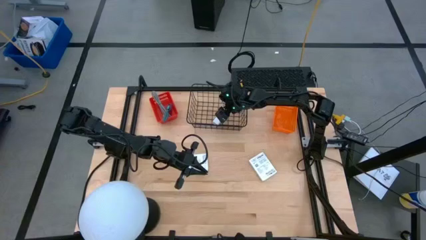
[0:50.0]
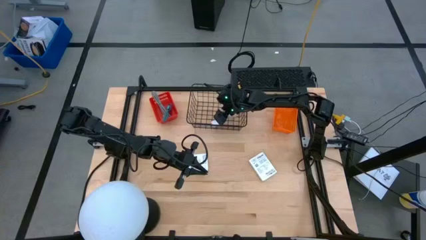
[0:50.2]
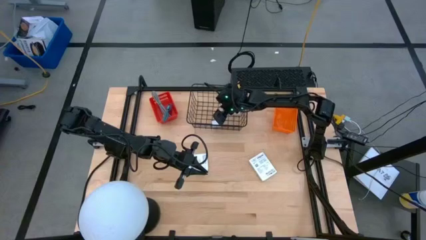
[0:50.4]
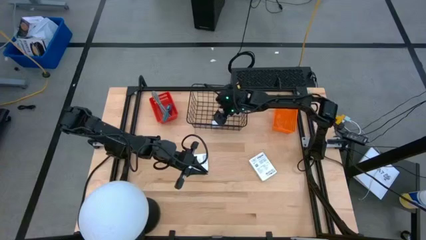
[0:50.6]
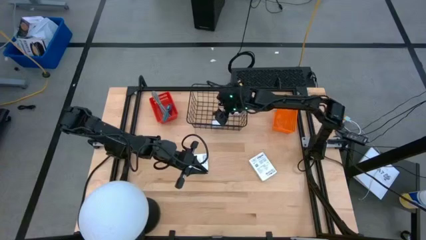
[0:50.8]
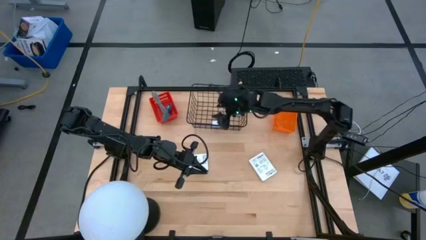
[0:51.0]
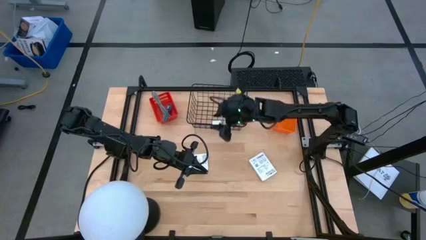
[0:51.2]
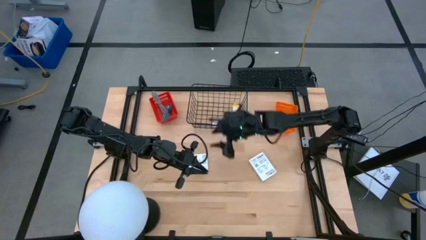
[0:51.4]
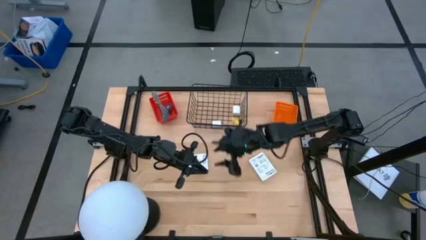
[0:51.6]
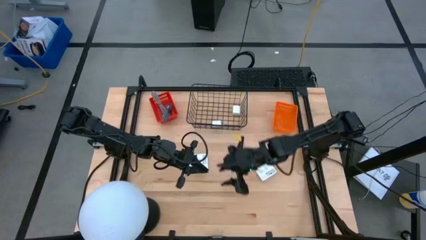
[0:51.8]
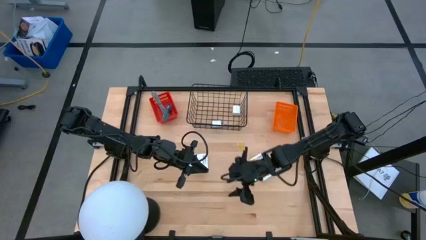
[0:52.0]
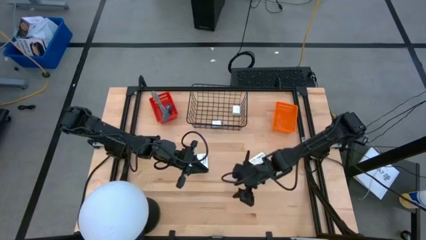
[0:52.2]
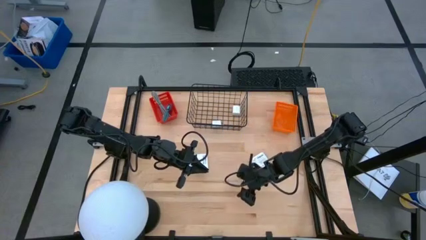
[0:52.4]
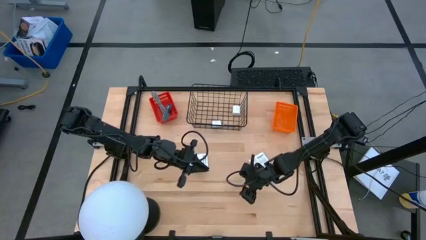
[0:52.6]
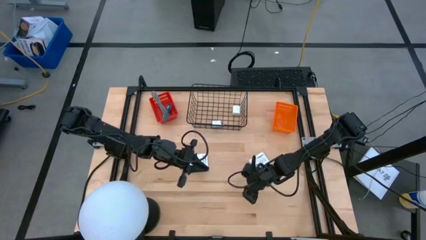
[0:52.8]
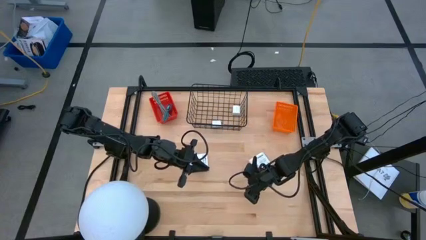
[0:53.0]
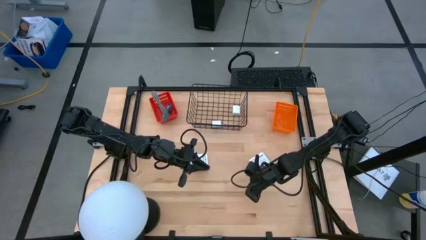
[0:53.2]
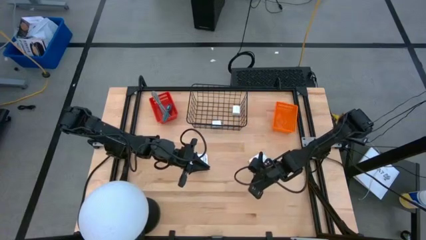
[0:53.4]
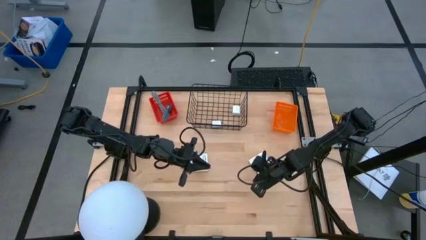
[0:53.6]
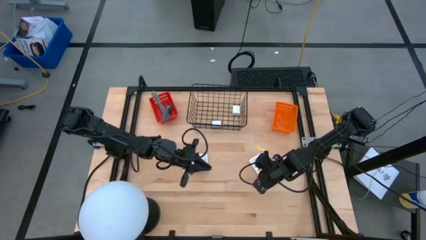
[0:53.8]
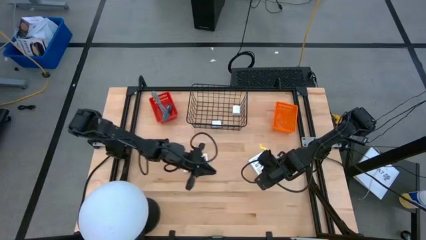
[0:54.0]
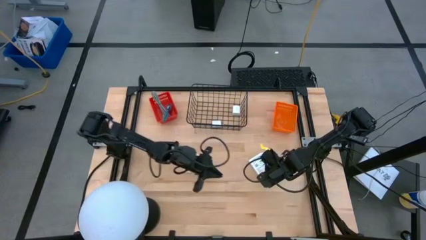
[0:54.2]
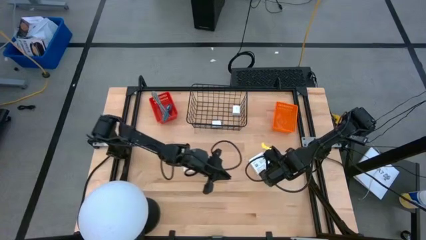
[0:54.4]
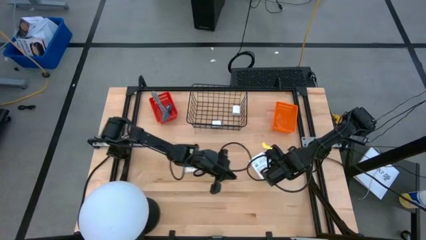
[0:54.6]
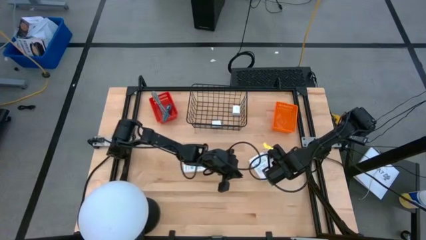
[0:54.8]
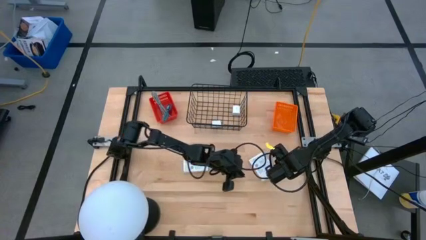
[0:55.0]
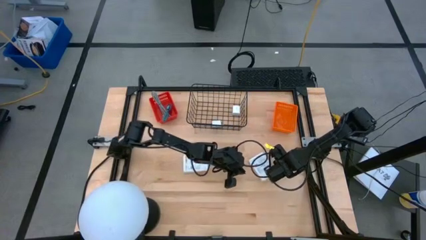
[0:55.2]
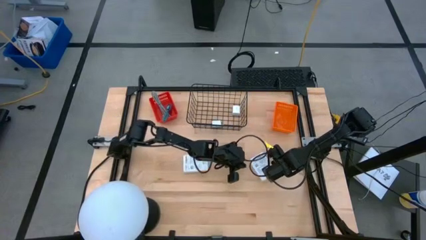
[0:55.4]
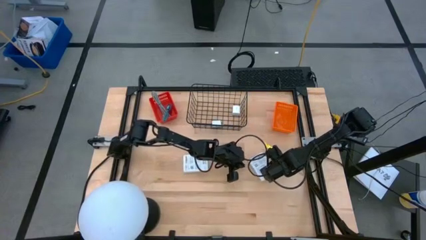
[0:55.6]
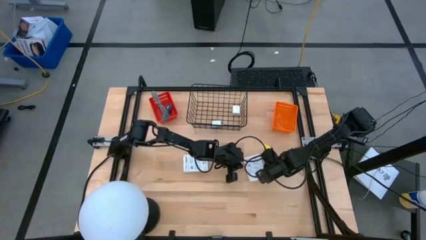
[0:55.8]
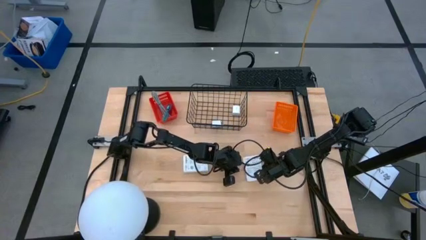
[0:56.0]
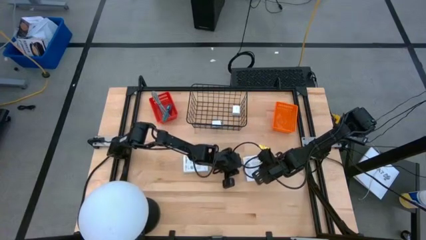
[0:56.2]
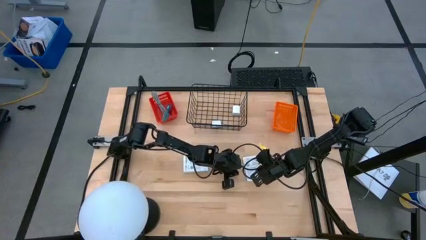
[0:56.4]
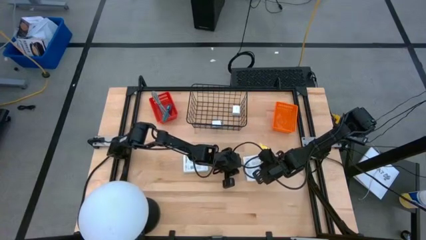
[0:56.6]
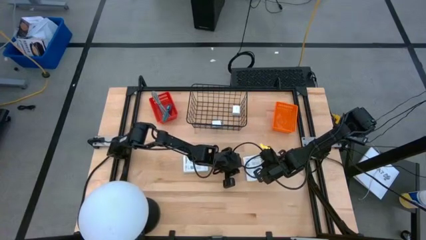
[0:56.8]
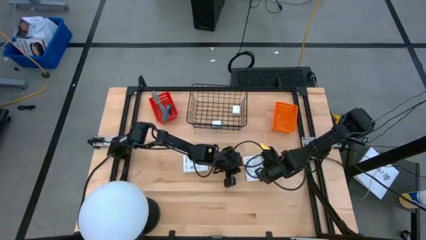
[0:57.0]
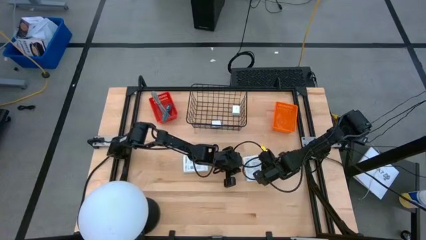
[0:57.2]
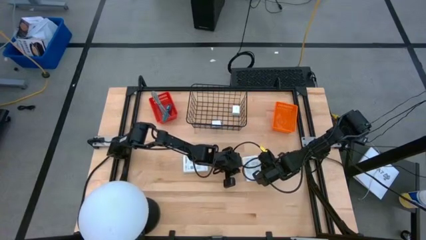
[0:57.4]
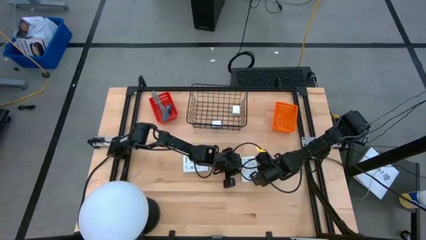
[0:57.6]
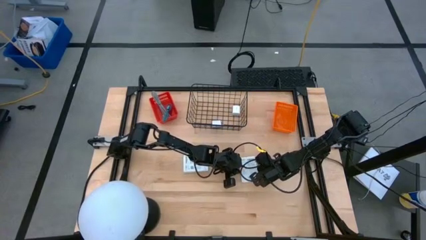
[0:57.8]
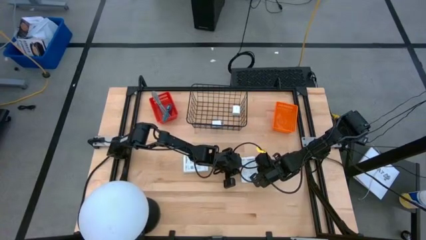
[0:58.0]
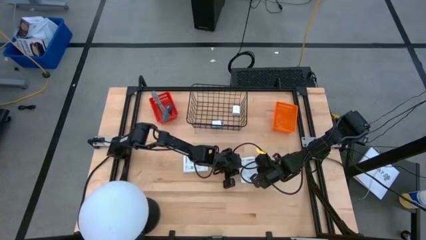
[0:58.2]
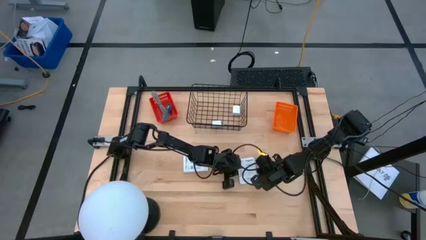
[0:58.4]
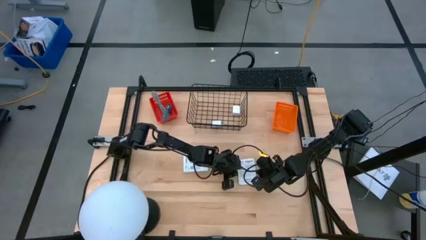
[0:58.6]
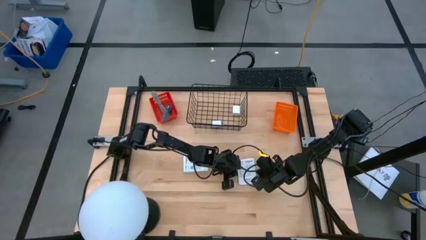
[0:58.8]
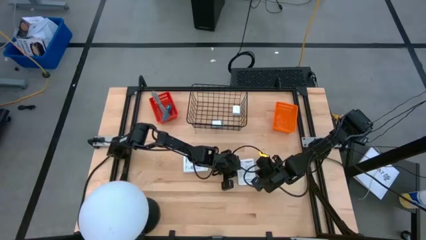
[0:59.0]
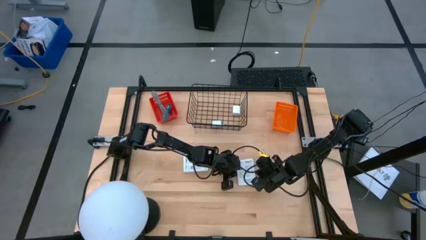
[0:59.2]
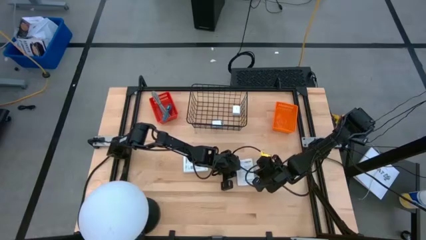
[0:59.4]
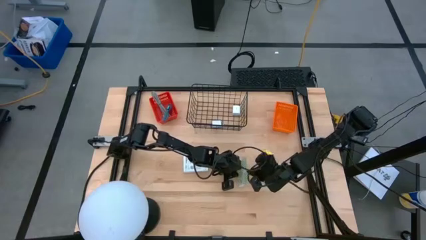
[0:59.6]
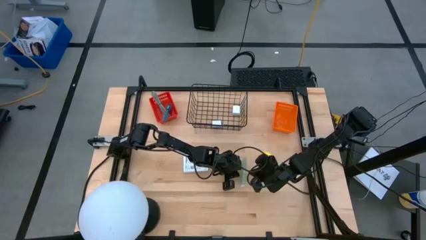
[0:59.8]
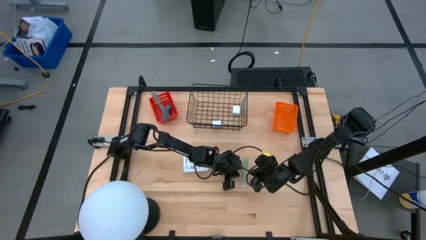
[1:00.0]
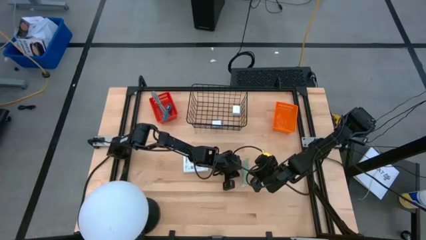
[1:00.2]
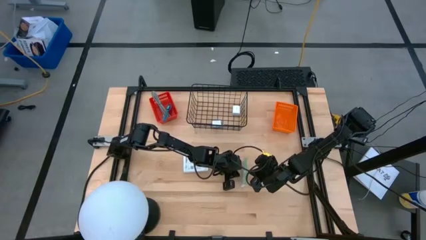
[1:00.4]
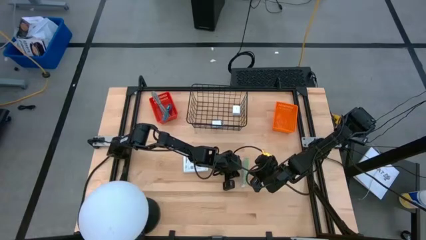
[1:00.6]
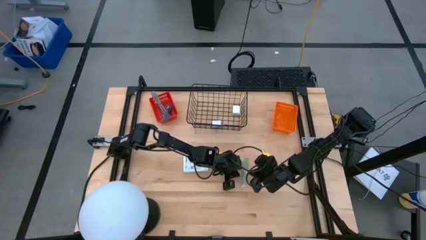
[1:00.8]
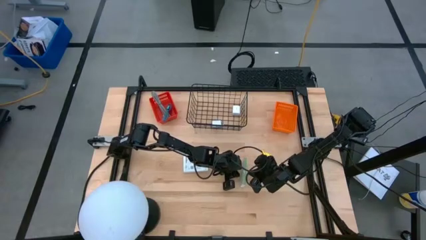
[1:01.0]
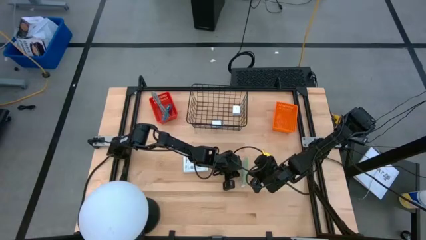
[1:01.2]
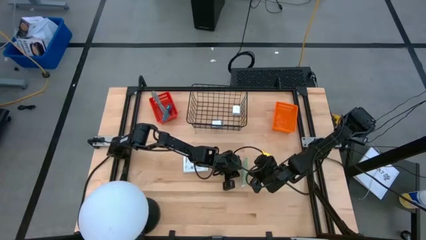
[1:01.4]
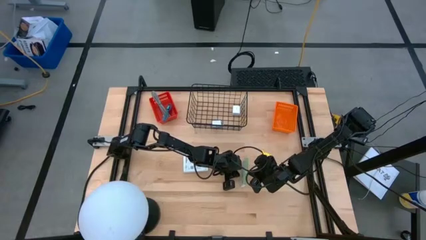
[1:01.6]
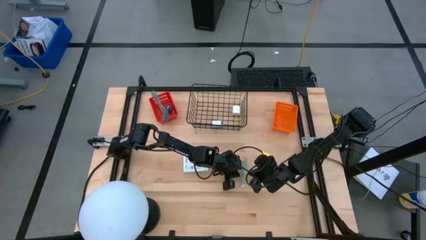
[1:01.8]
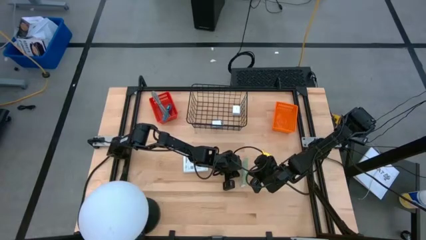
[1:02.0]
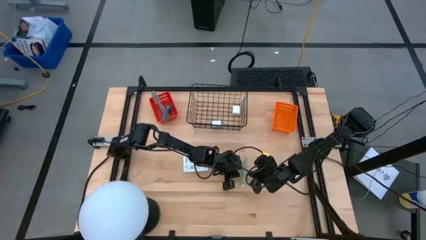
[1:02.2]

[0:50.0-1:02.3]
Task: Pick and place items into bin
Put the right card reader box into the orange bin
